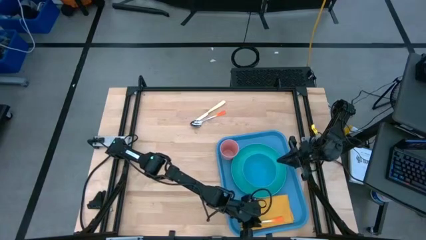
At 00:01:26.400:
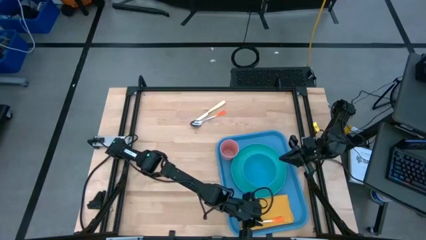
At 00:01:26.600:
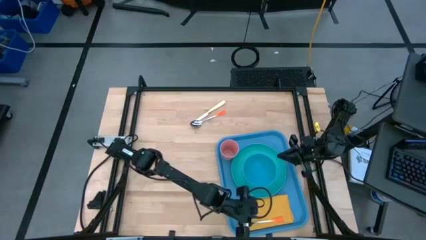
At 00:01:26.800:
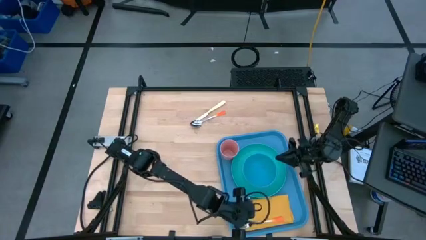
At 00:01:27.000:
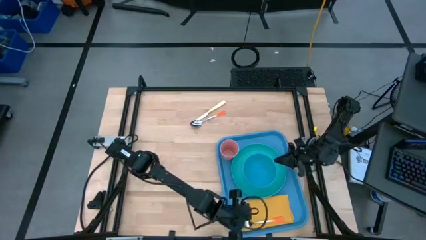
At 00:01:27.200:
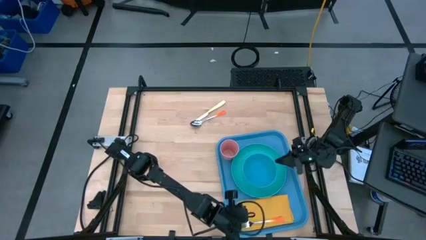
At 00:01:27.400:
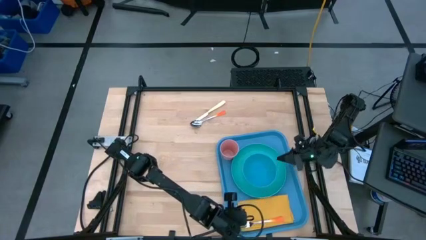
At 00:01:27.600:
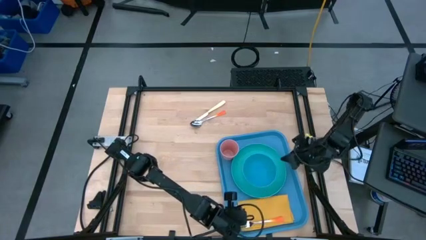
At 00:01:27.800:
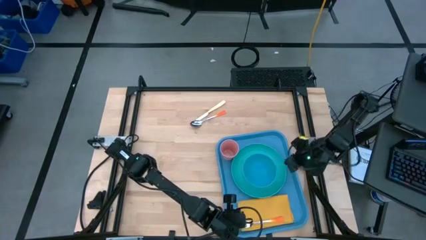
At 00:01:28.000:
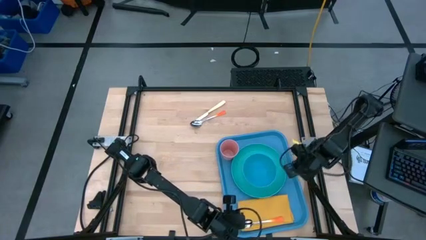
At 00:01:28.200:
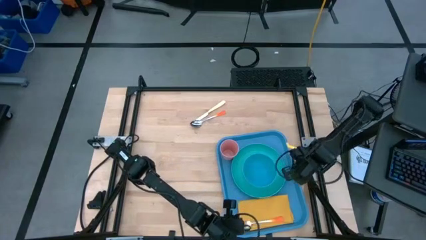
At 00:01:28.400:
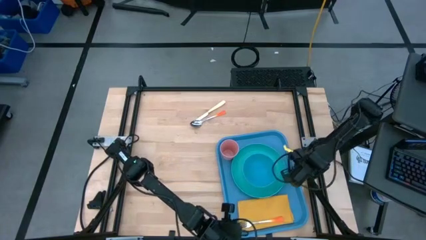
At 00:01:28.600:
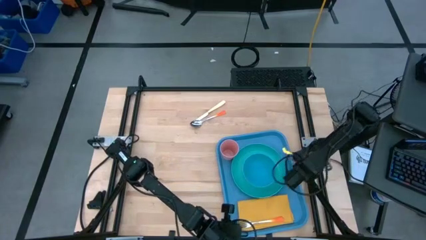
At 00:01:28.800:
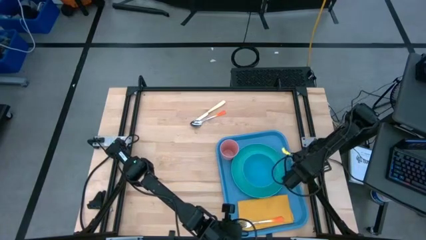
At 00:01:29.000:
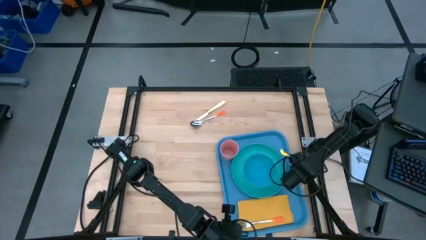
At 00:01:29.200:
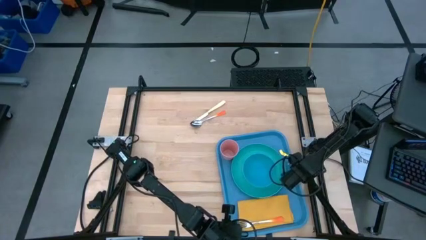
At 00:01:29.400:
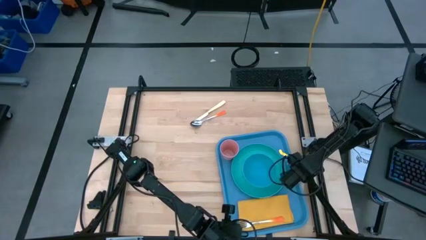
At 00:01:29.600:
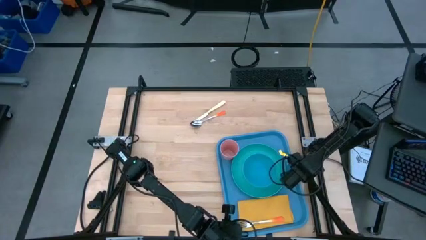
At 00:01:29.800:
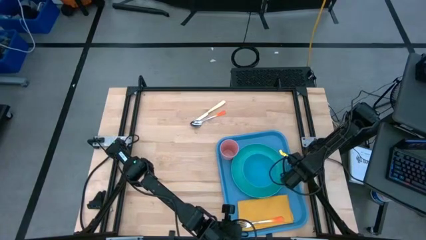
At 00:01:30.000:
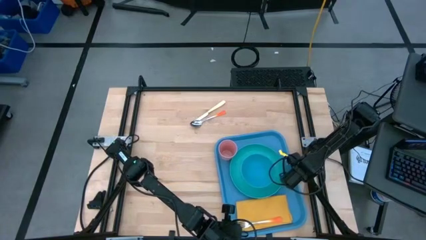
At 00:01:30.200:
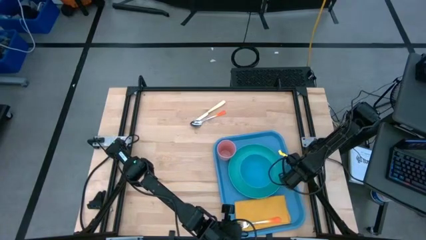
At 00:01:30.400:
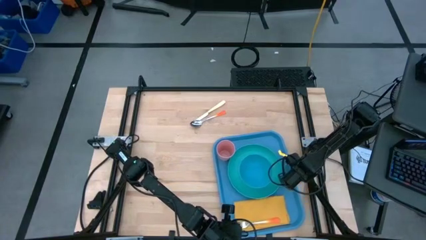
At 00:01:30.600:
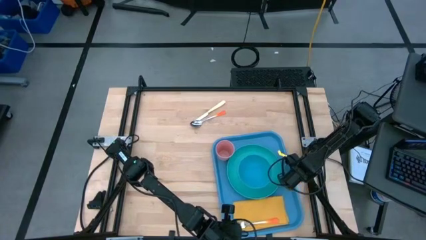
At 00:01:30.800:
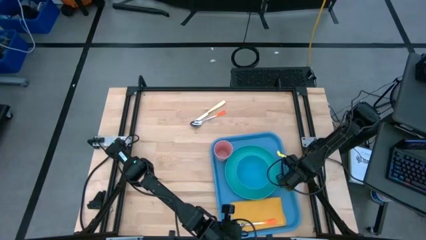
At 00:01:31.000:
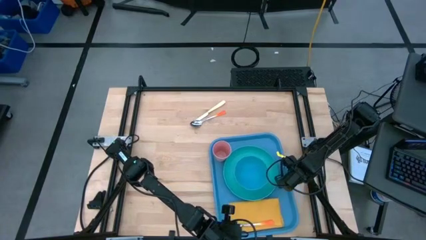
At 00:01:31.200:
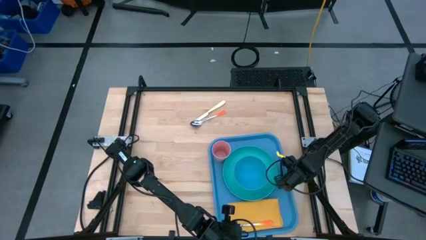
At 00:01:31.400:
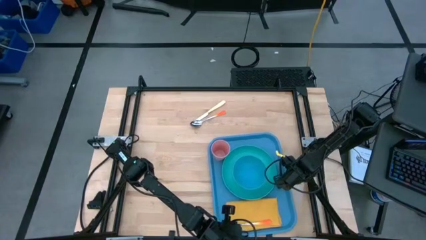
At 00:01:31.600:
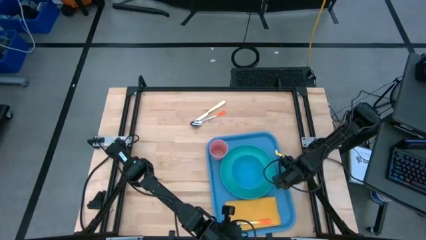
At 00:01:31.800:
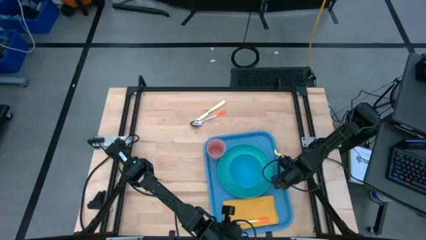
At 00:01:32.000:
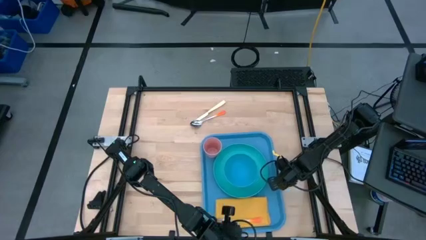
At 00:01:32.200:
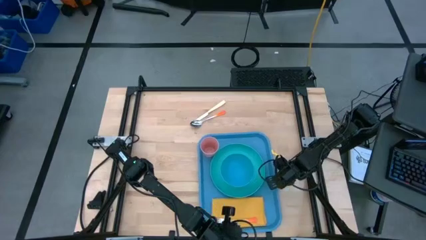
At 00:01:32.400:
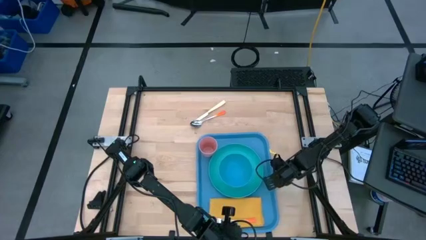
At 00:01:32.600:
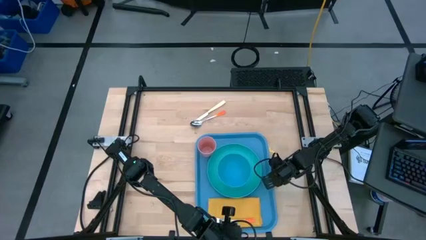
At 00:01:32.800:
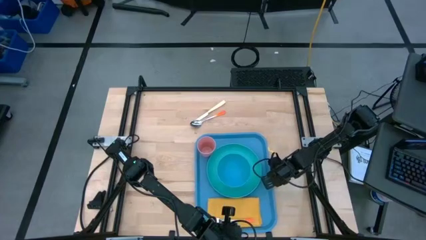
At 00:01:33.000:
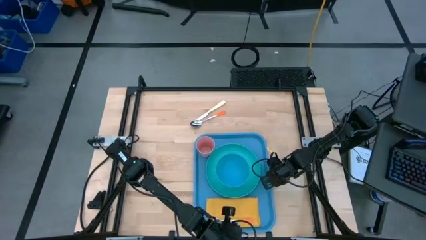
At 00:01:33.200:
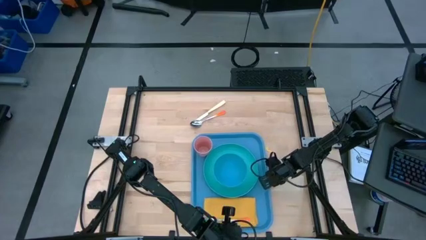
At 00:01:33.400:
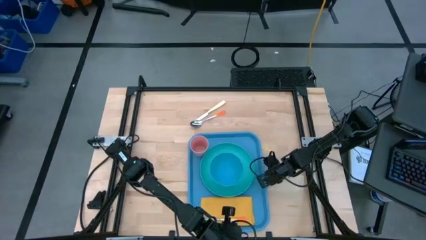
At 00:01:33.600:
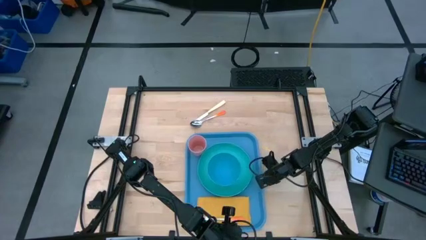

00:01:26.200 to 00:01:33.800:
Task: Set up tray
Move the blue tray to the center of the table

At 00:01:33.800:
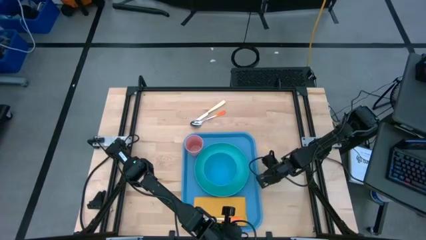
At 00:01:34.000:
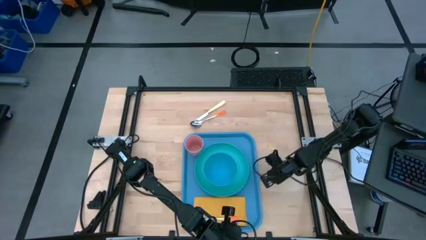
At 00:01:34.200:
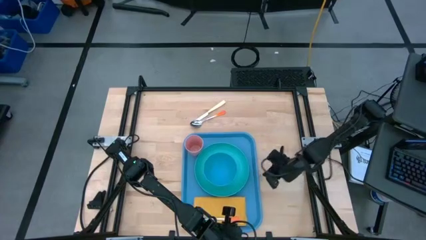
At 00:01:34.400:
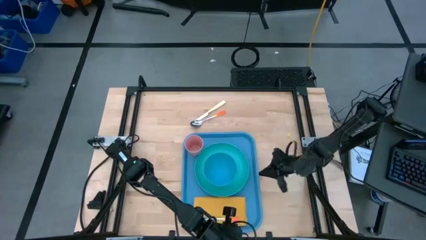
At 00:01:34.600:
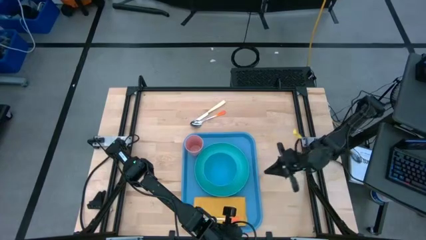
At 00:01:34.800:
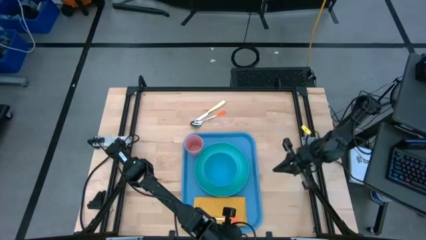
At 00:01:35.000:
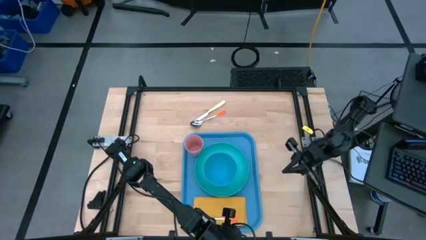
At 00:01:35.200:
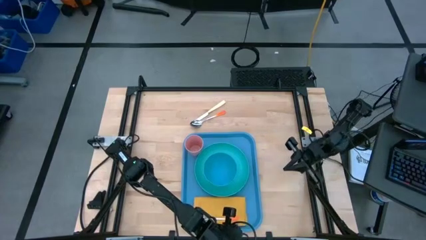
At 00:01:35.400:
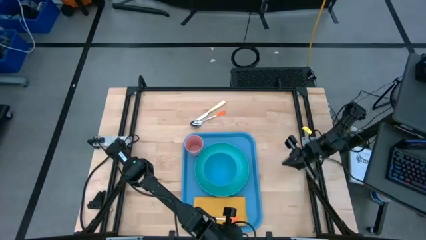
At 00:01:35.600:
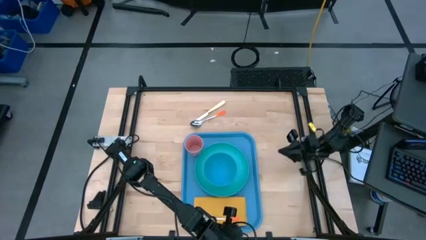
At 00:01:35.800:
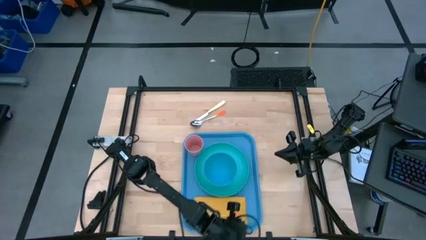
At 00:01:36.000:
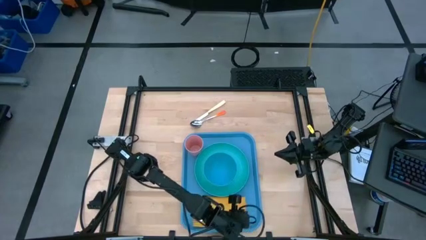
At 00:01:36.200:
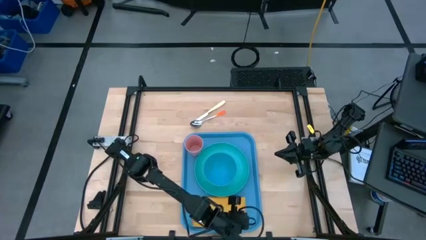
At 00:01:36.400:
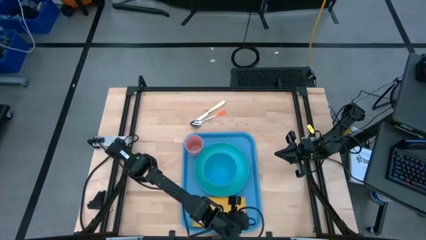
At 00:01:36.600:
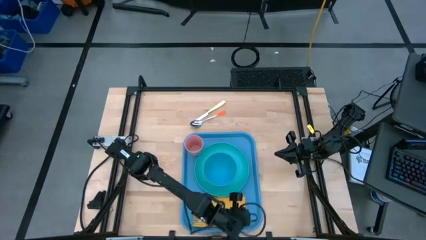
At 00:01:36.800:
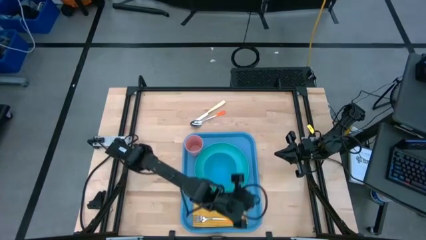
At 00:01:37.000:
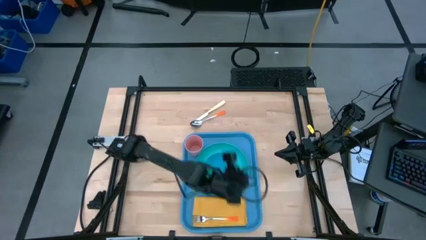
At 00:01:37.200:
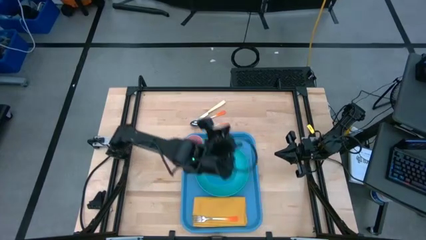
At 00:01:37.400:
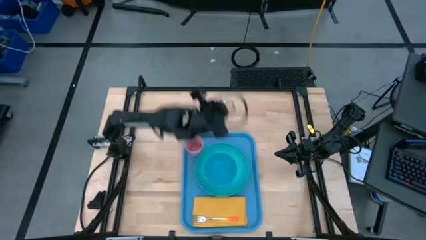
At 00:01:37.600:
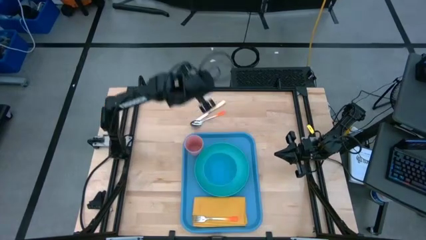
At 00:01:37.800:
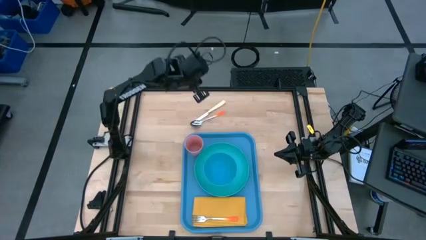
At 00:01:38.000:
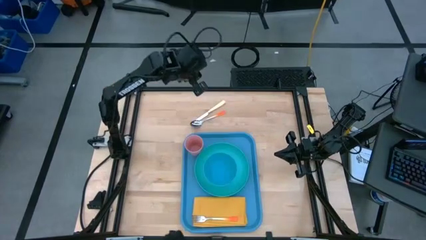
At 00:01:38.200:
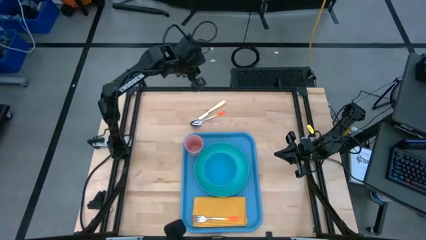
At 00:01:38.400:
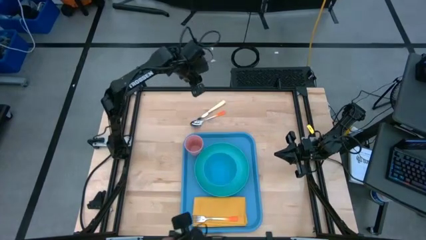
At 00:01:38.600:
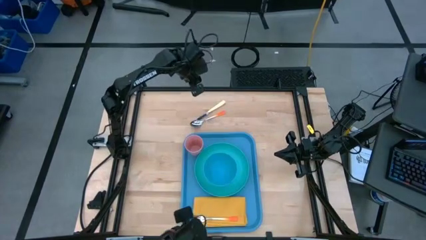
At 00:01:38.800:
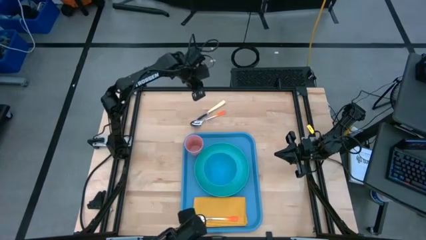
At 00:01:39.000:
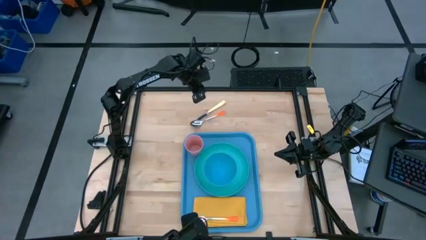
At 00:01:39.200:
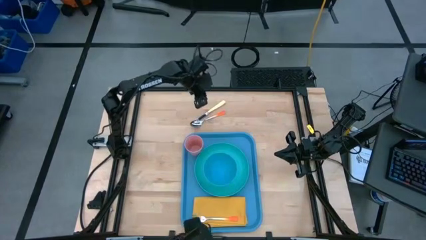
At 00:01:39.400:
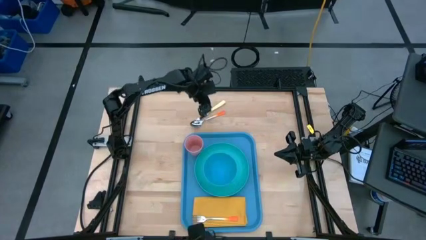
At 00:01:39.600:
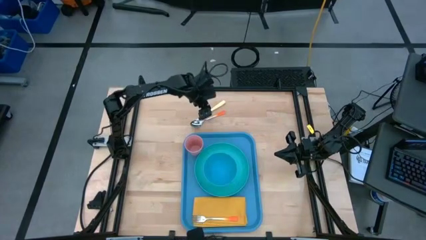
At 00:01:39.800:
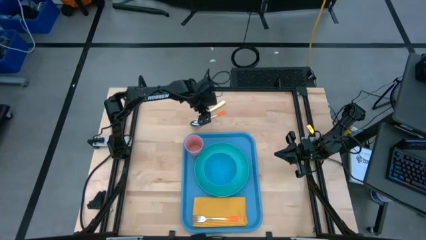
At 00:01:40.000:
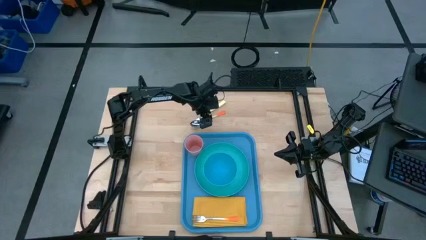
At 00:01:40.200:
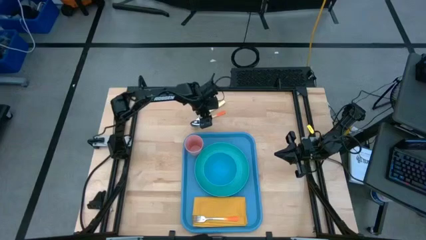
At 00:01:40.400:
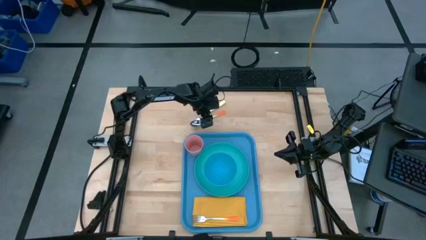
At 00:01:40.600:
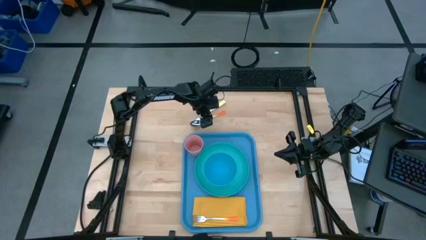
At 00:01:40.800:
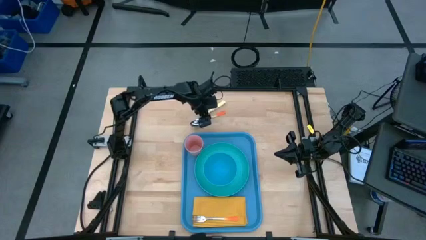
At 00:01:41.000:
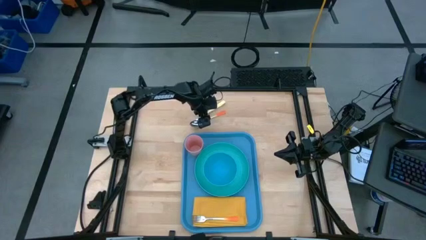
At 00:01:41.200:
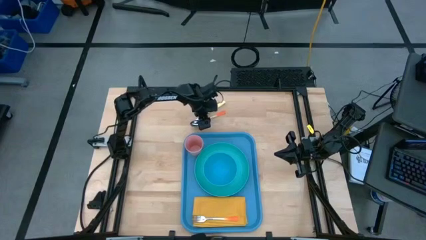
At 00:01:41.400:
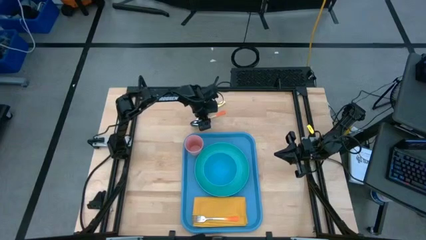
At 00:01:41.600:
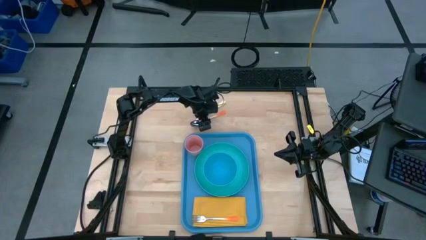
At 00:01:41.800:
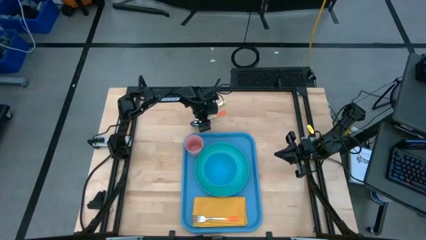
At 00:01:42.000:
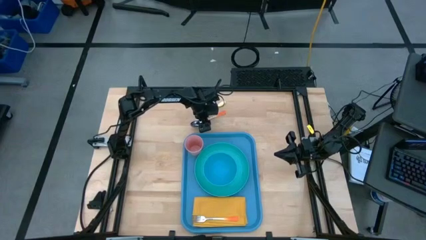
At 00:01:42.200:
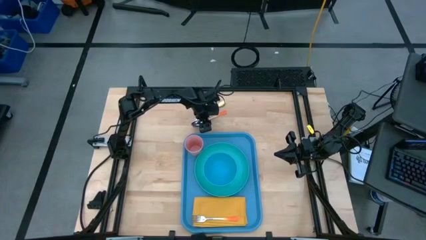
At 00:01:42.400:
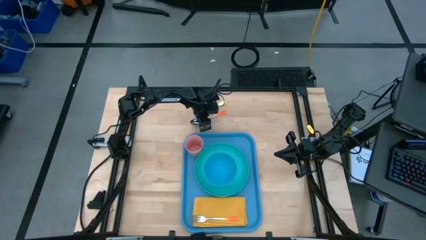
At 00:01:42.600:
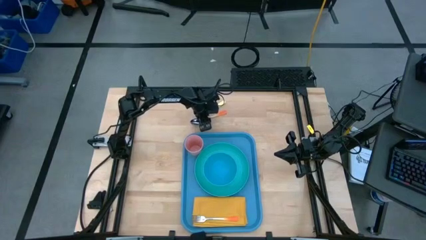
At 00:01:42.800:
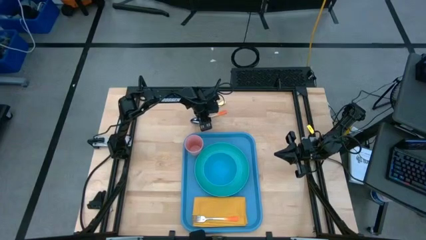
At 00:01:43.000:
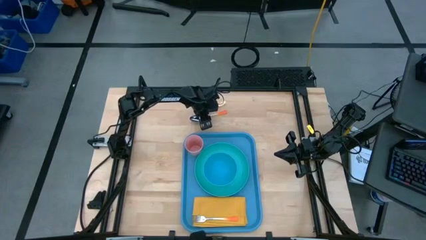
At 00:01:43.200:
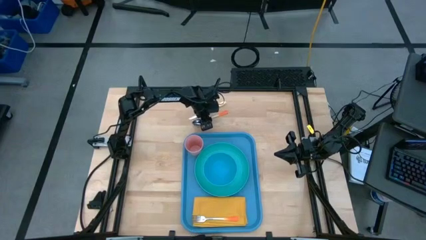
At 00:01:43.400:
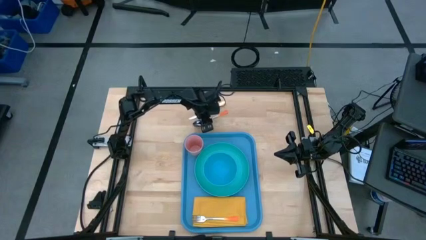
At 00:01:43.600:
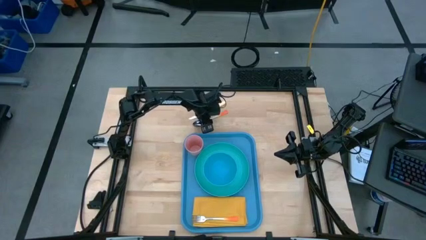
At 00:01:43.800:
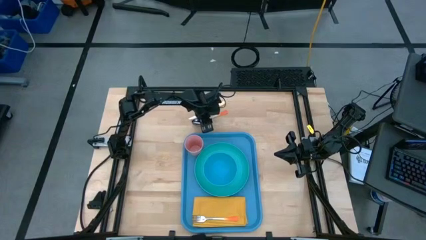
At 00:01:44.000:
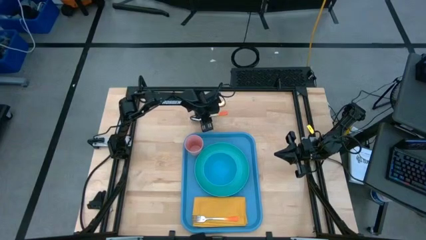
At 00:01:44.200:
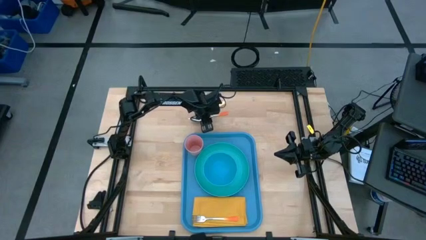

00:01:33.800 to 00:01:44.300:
Put the orange spoon on the yellow table napkin to the top of the orange fork
